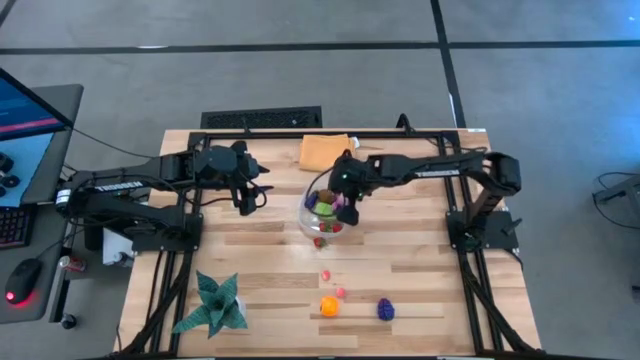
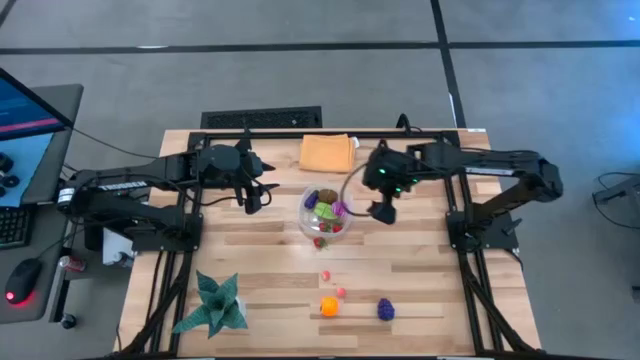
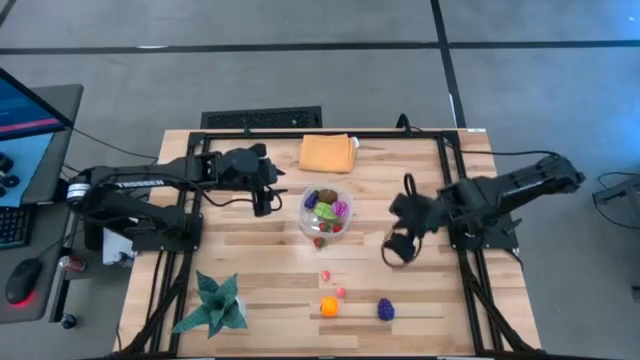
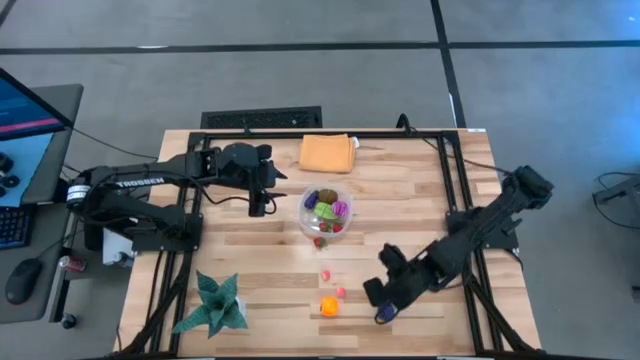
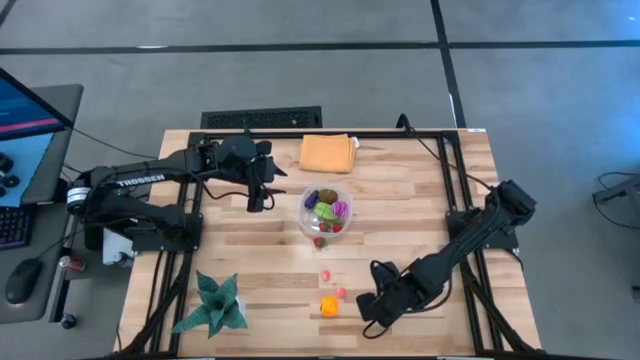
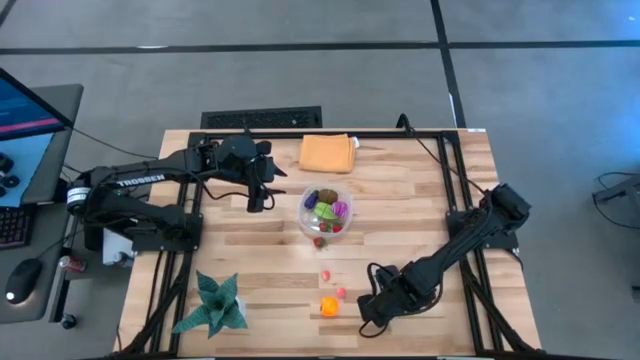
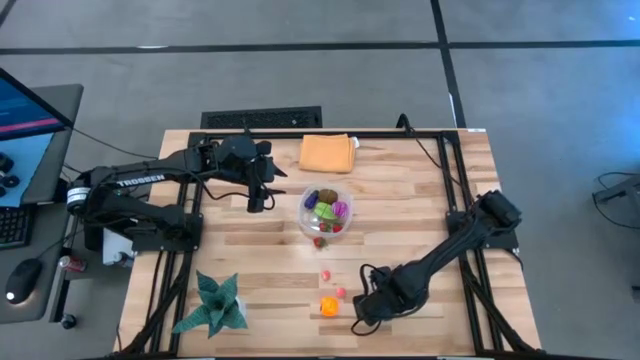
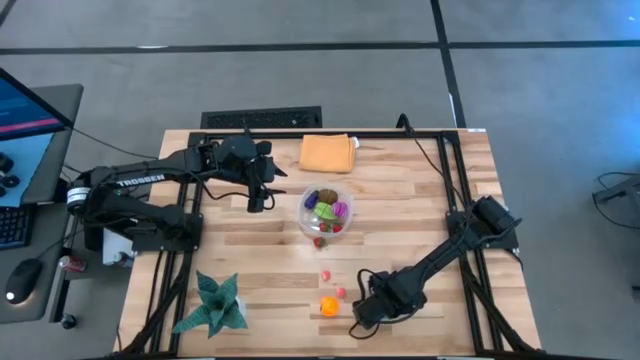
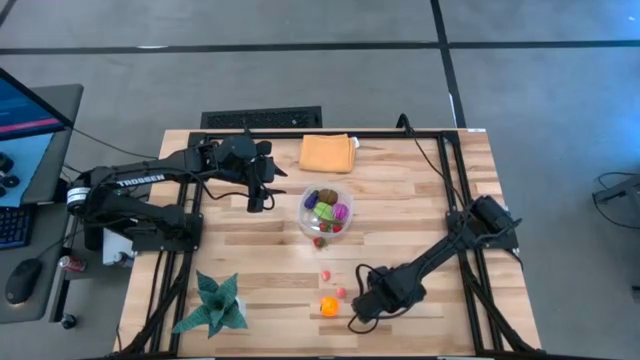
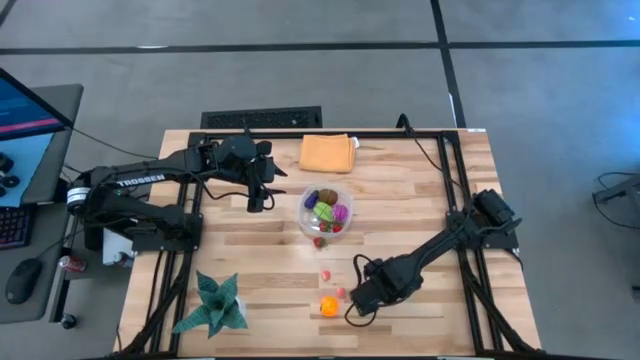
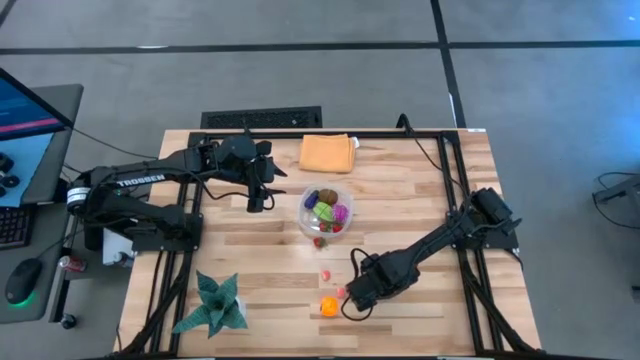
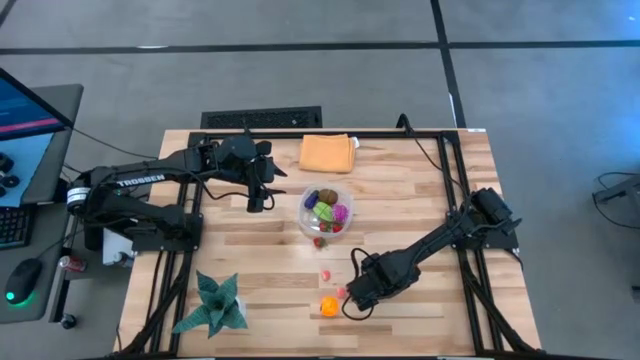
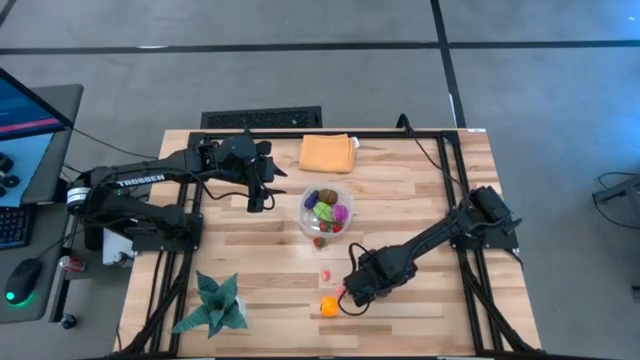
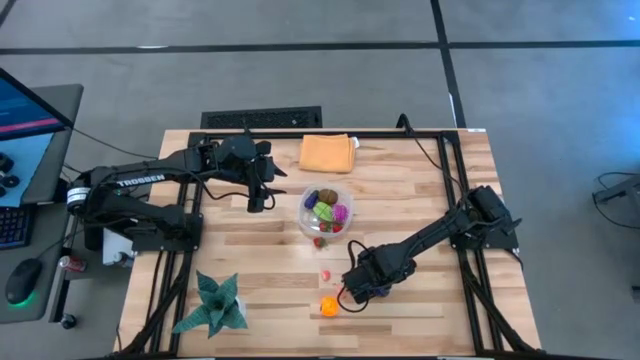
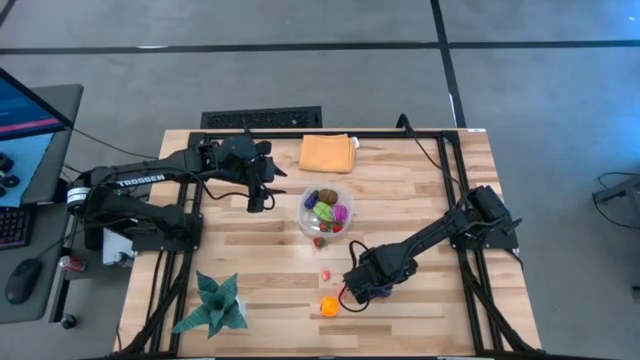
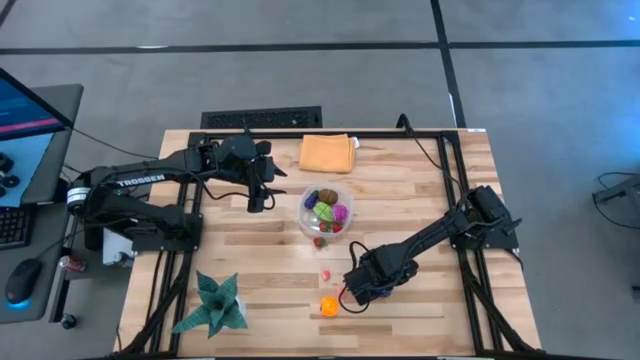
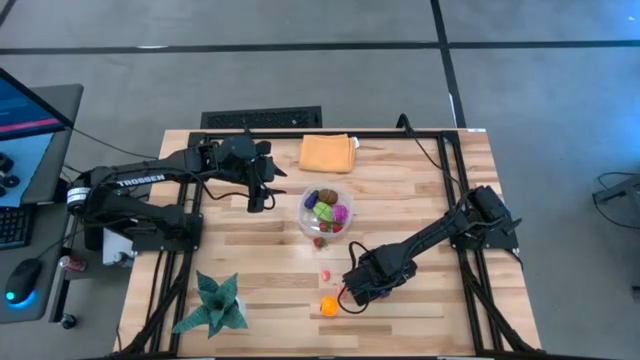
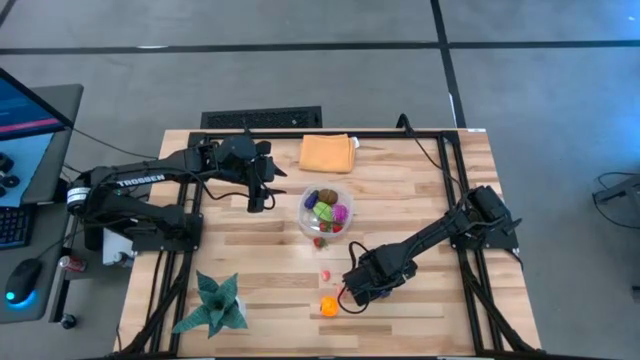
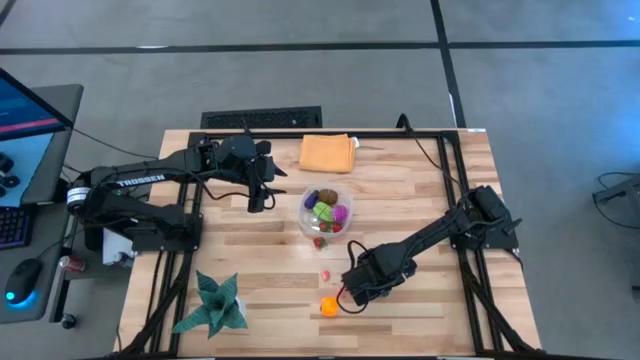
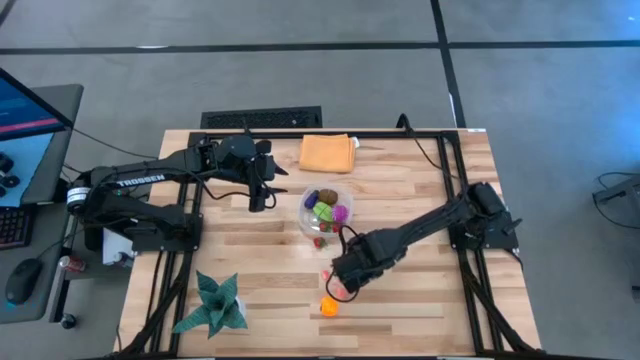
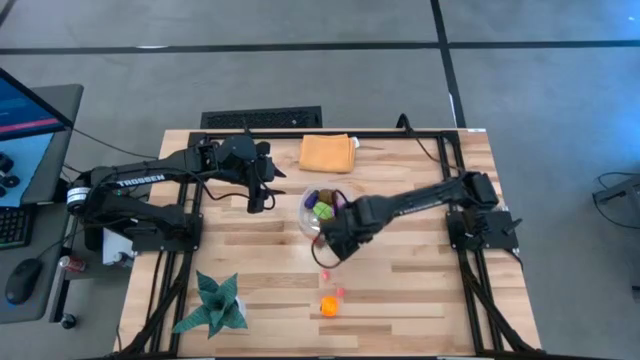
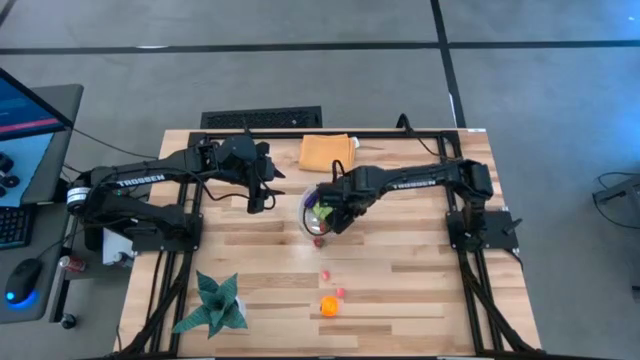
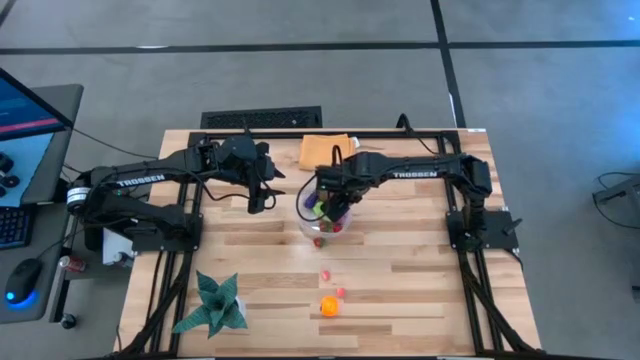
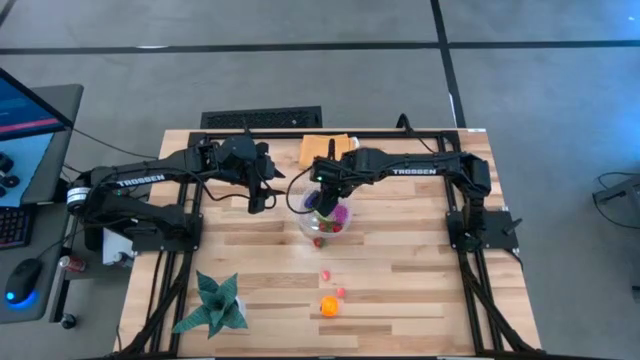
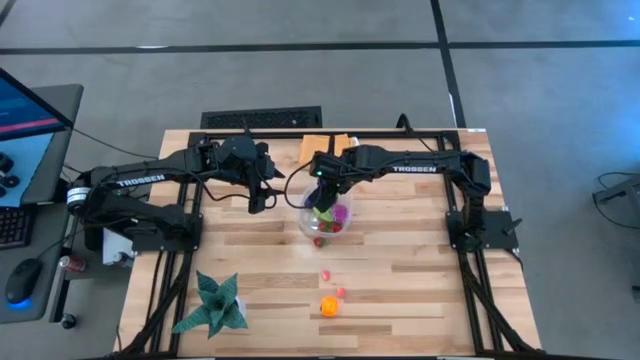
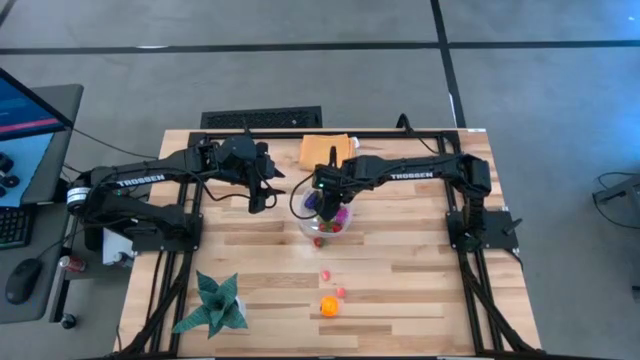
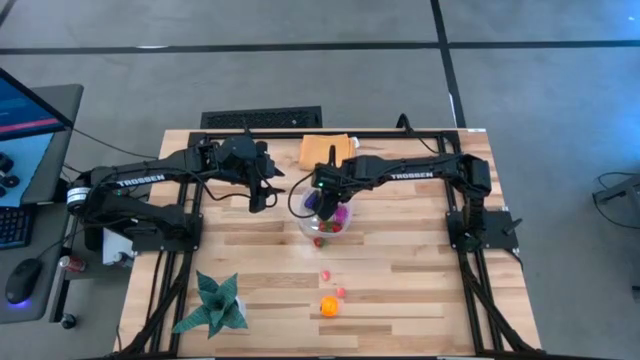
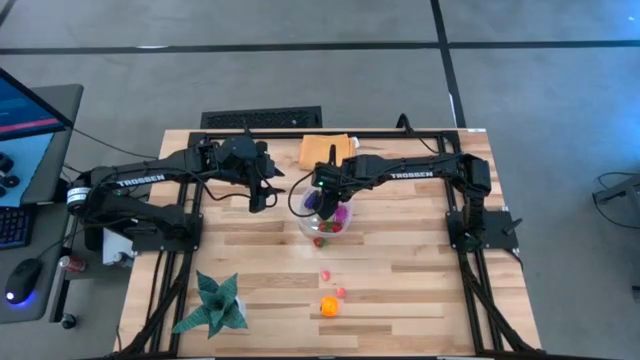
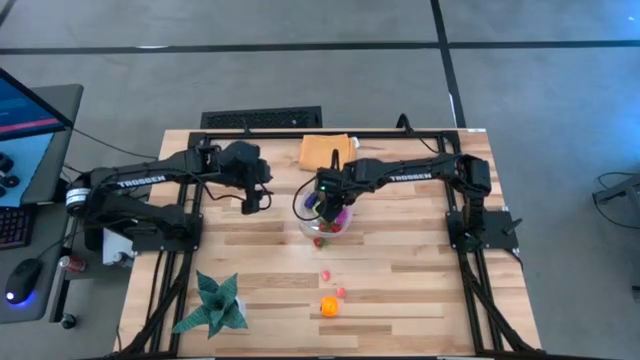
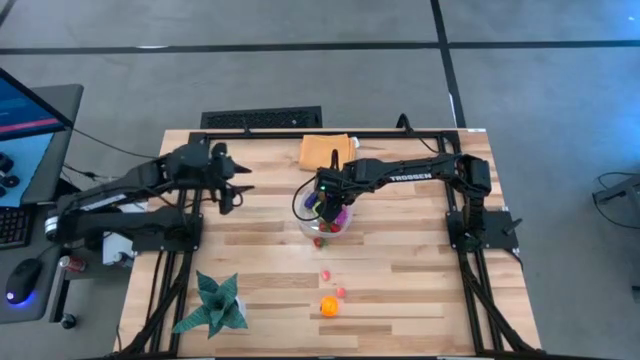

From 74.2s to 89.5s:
Task: Pick and placing Produce into tupperware
Put the violet grapes into the transparent container

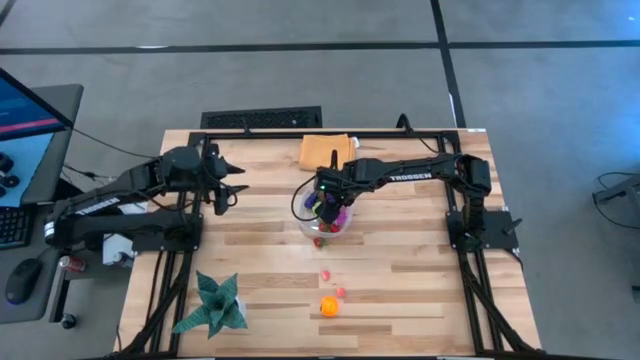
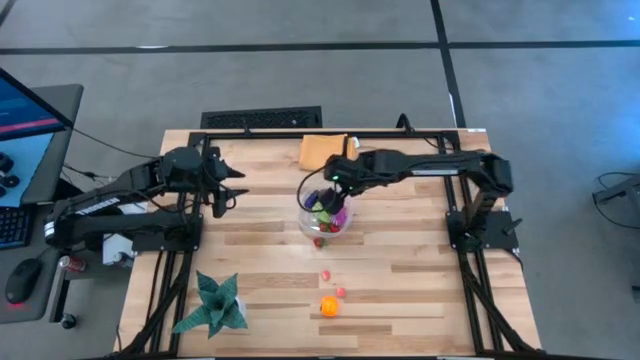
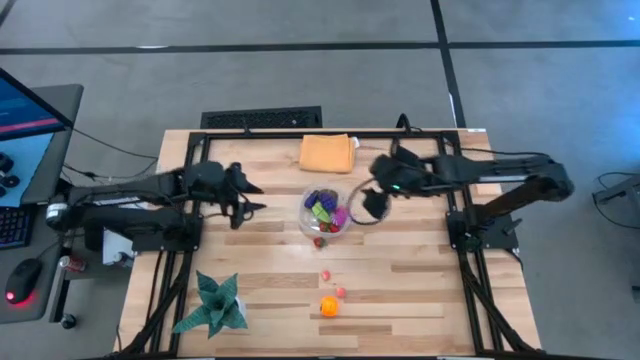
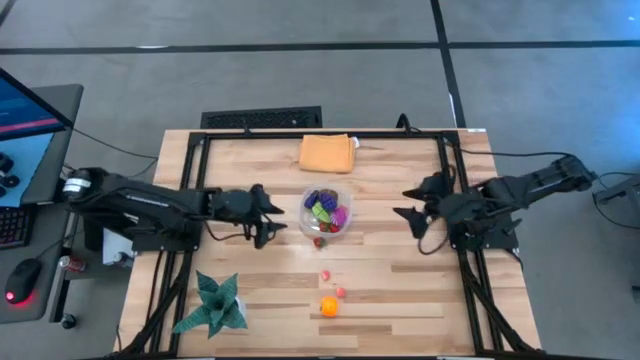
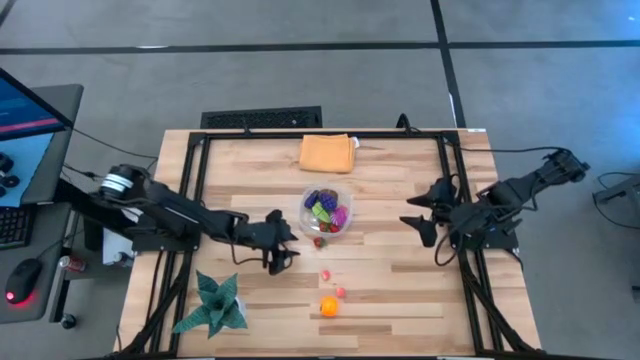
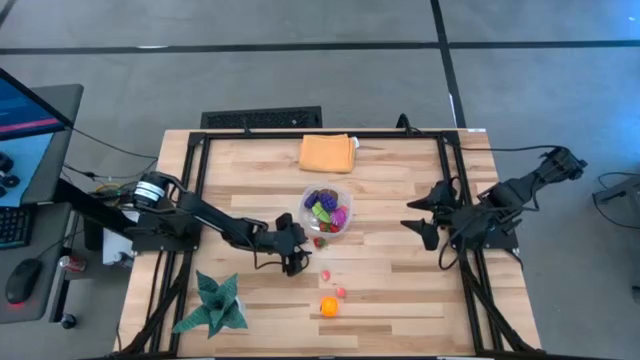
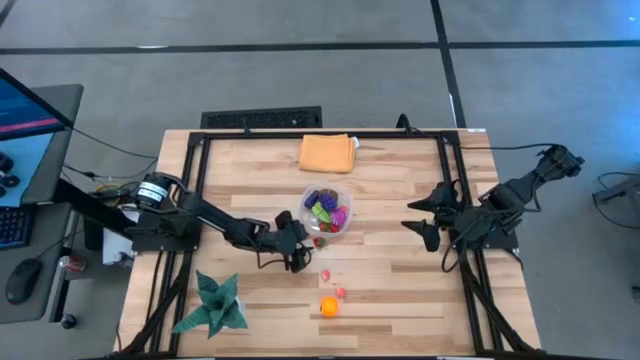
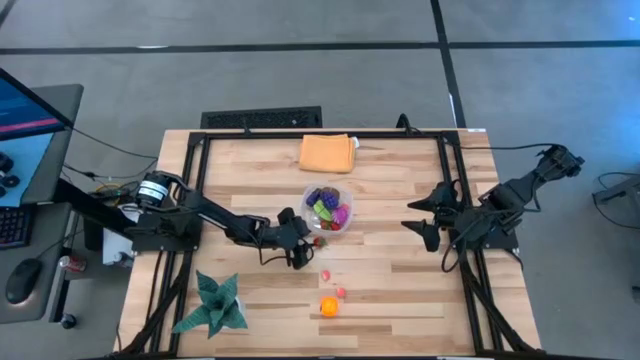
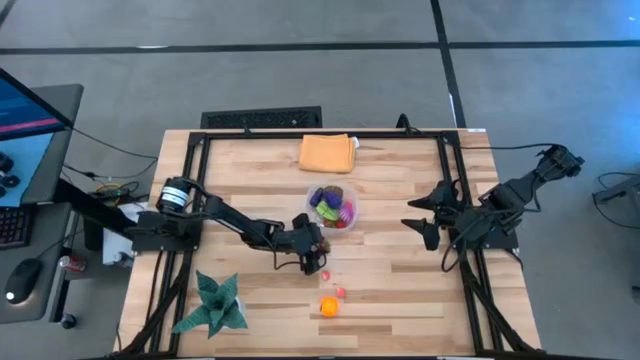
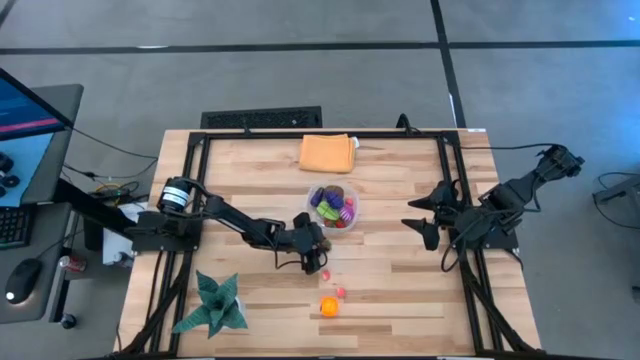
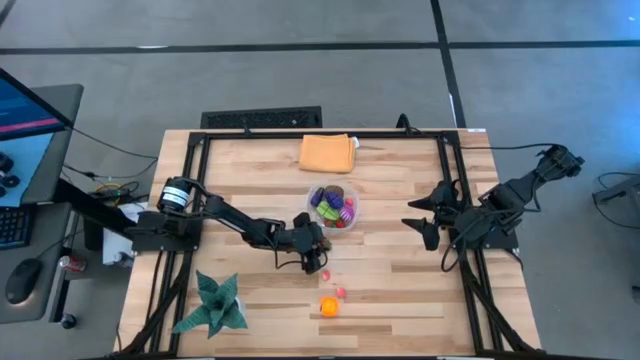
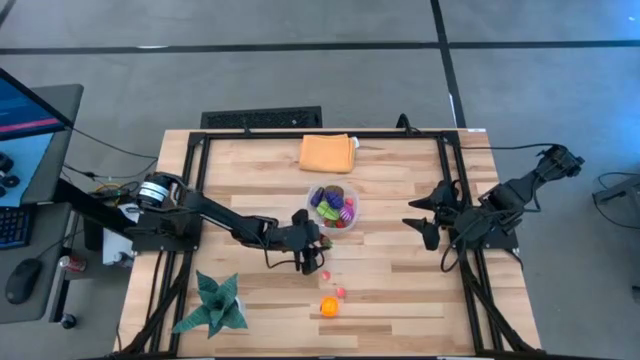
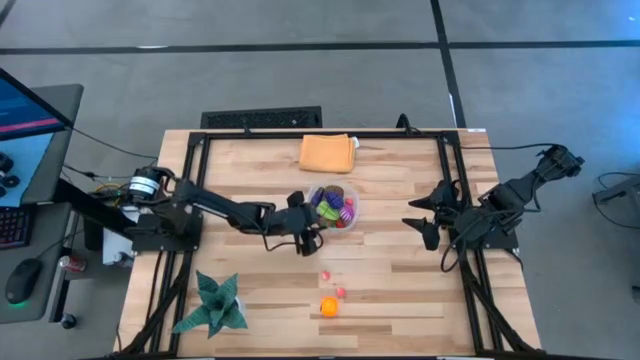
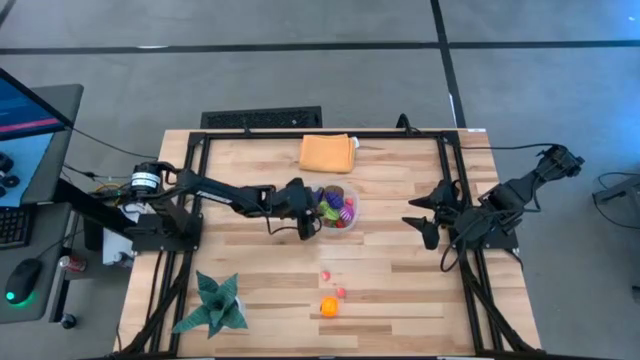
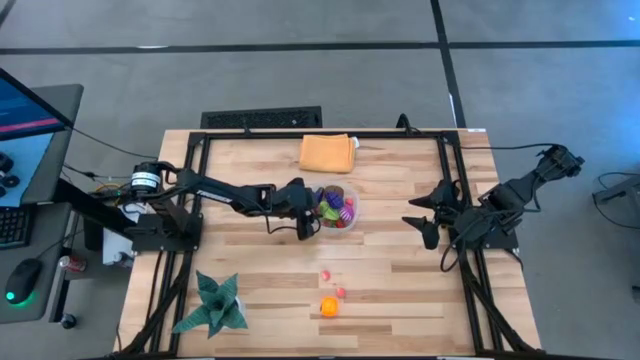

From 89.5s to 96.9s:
Put the red strawberry into the transparent container
